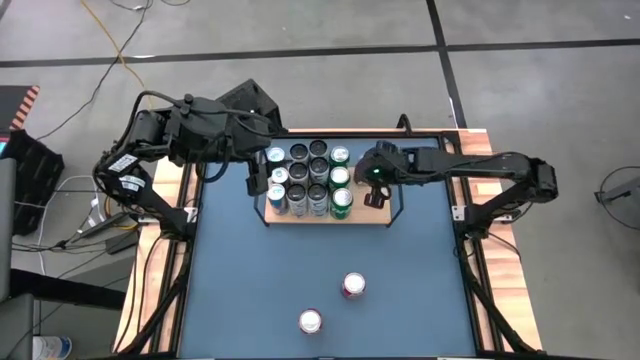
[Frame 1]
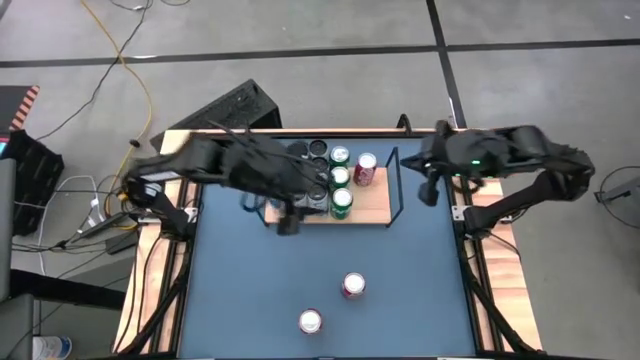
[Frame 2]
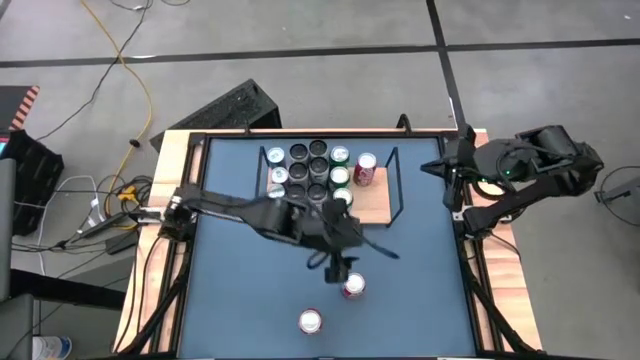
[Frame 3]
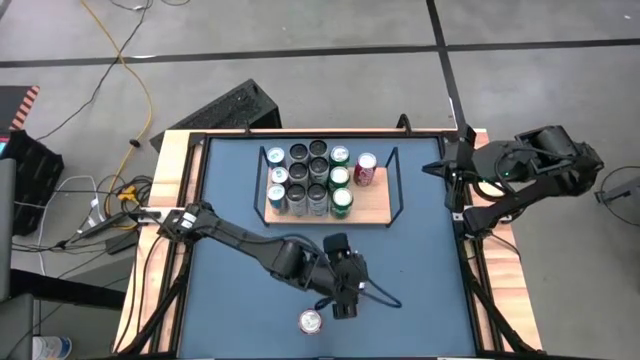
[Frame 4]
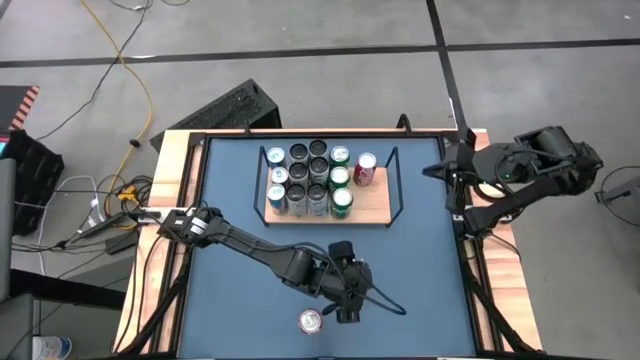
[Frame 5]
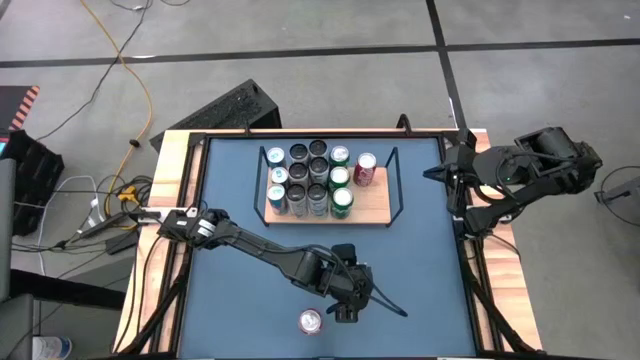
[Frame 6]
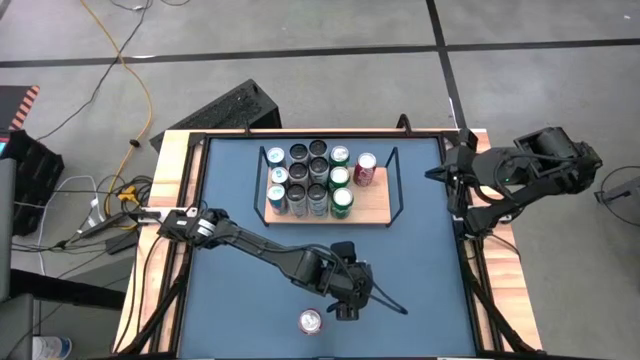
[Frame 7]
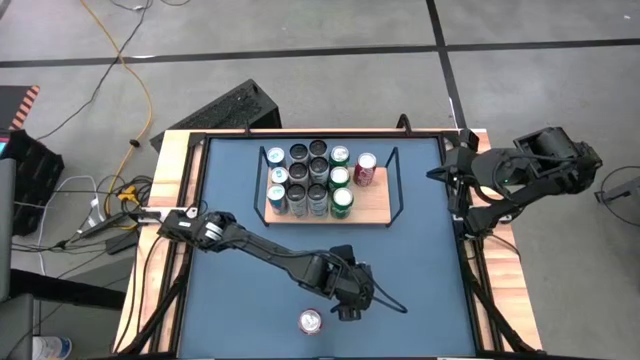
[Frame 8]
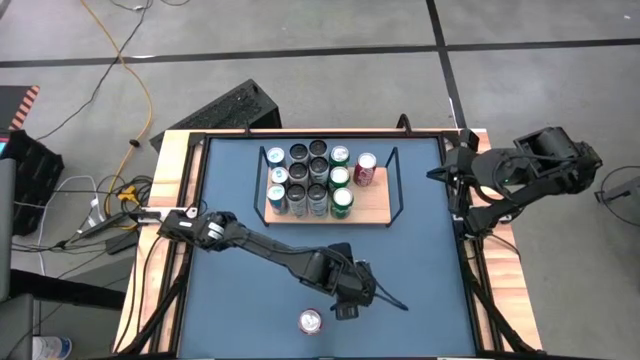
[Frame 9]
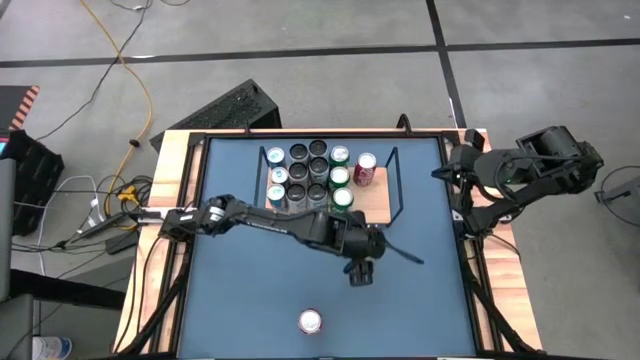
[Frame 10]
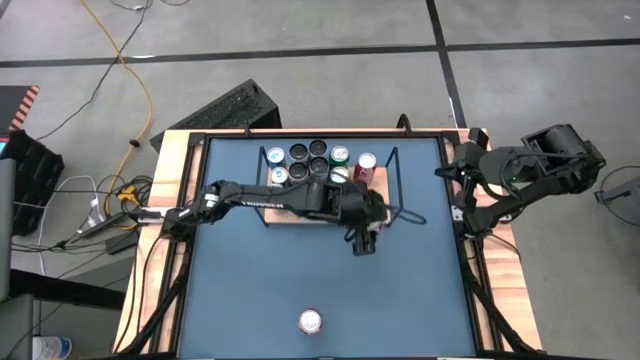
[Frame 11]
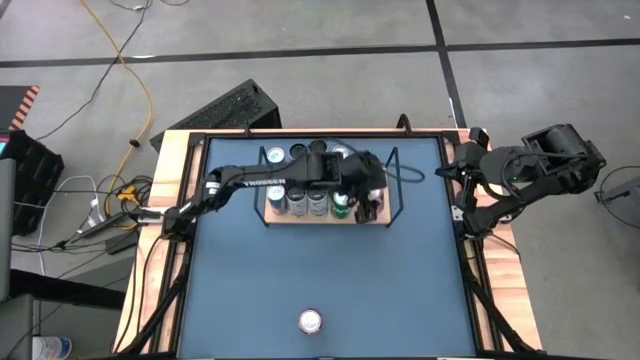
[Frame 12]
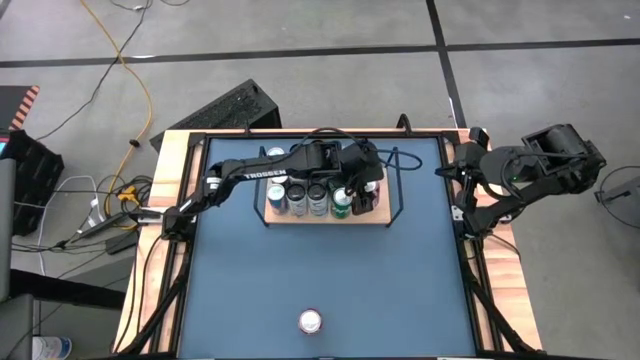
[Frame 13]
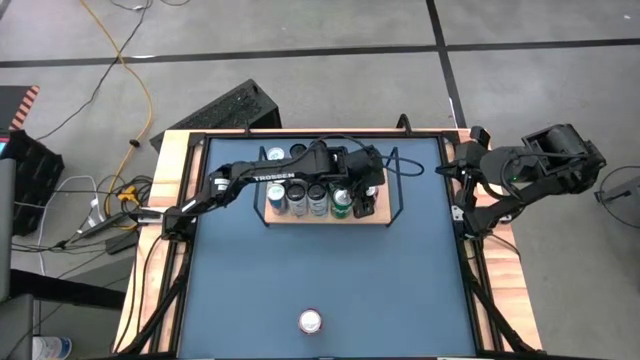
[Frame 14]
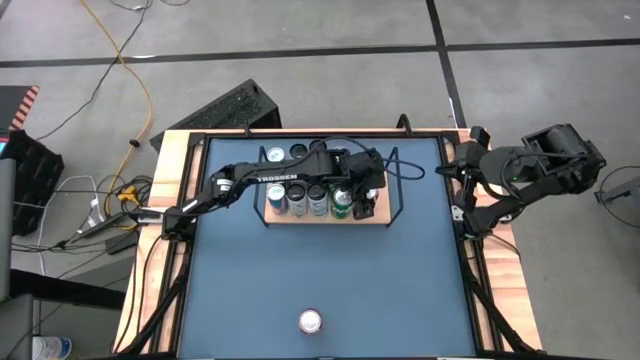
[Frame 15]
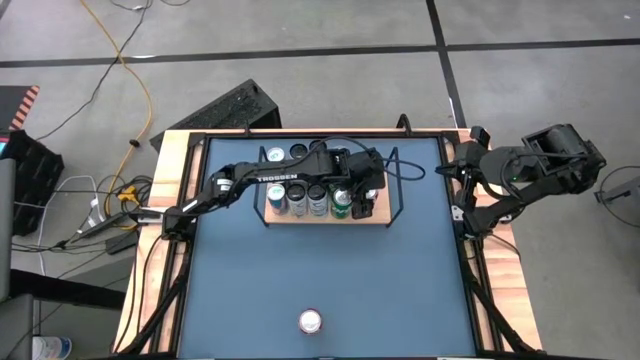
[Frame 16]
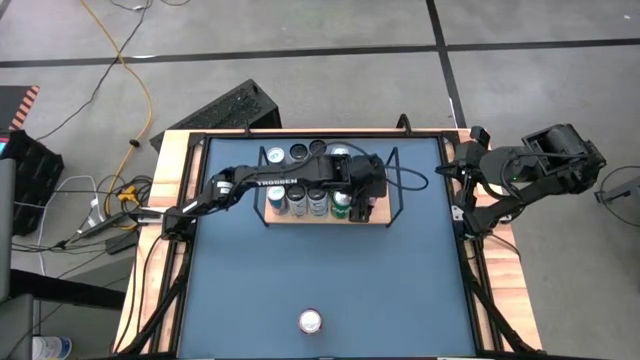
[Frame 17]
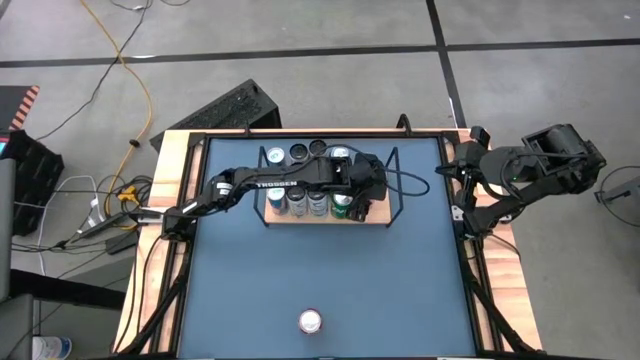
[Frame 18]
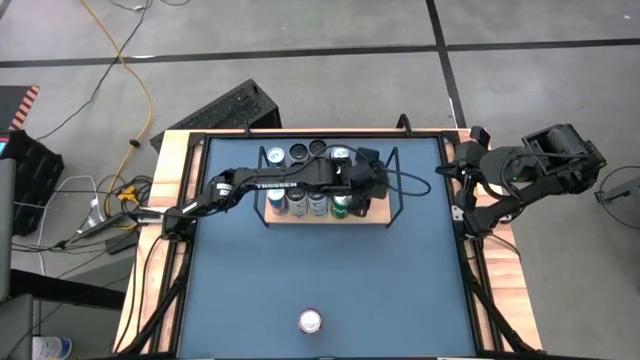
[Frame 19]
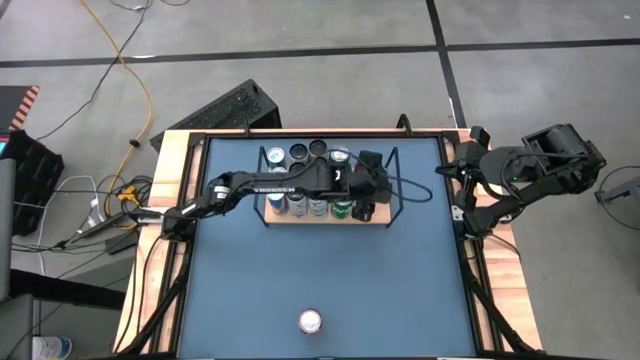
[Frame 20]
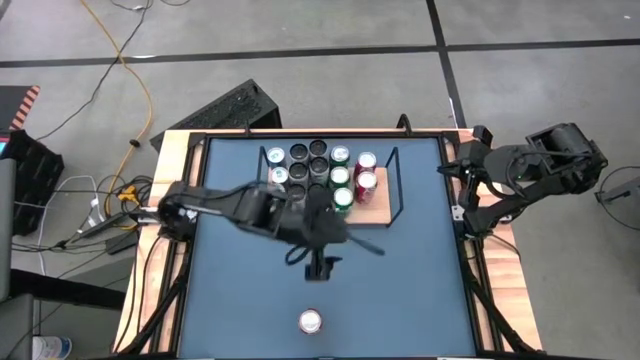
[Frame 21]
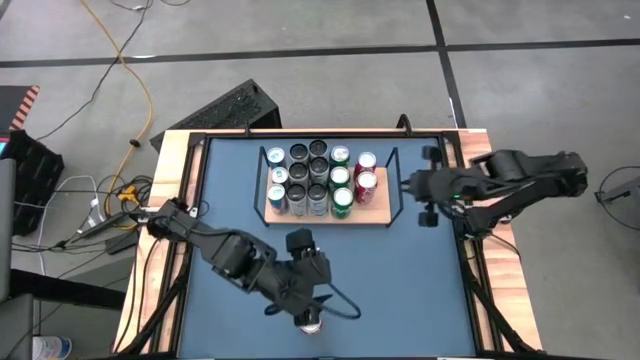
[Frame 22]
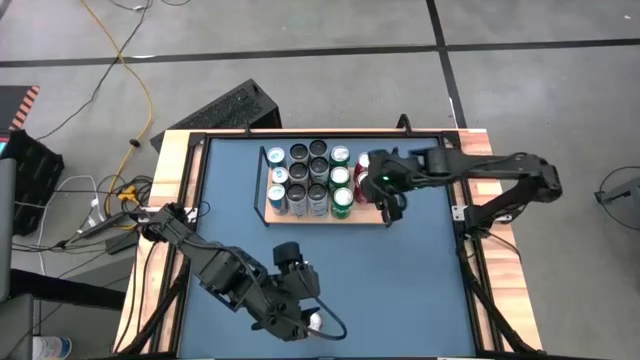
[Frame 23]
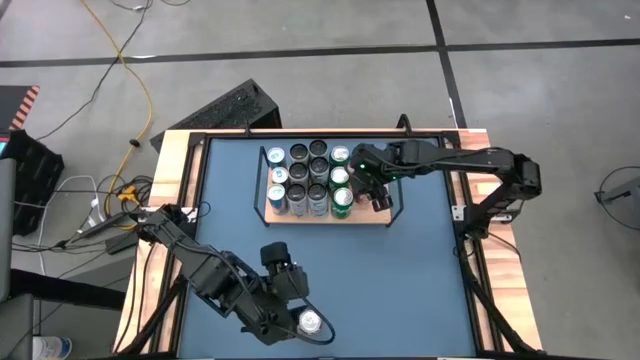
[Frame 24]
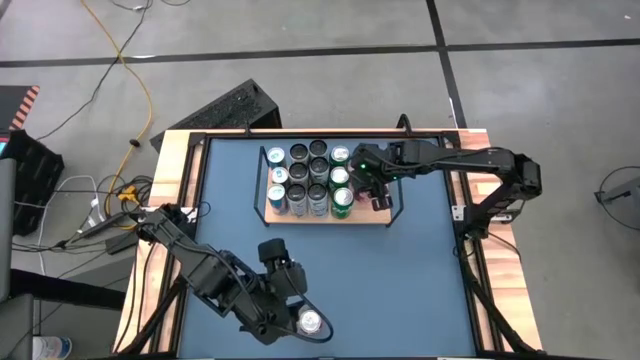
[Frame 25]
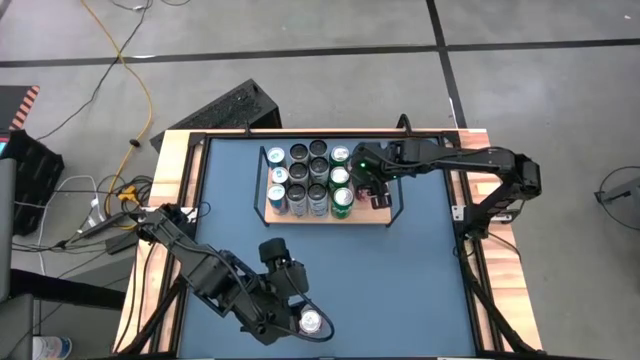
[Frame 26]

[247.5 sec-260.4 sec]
Task: Place canned beverage on shelf
Put the right red soda can on the shelf aligned with the other red soda can

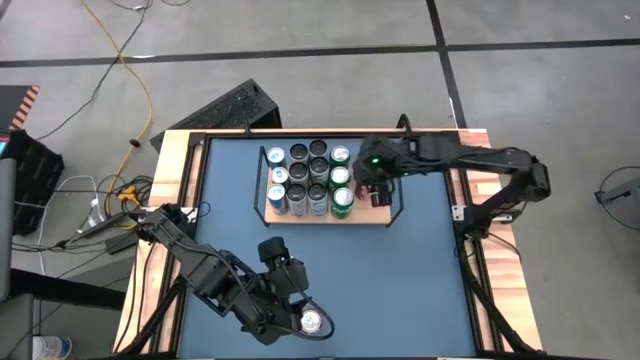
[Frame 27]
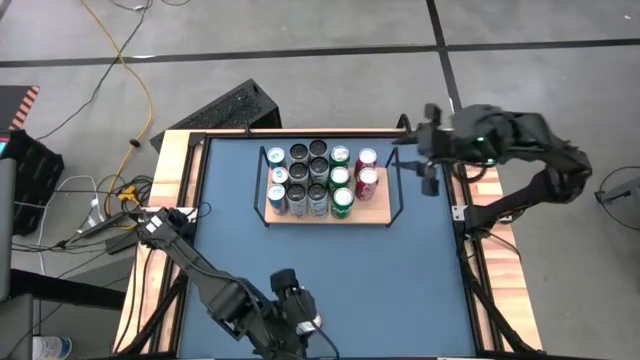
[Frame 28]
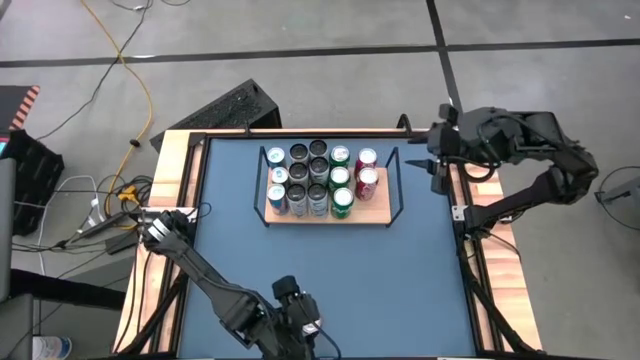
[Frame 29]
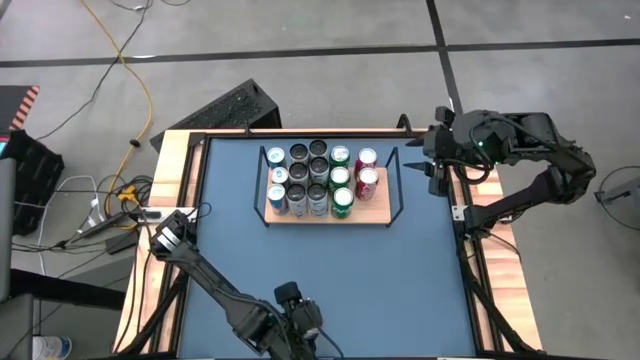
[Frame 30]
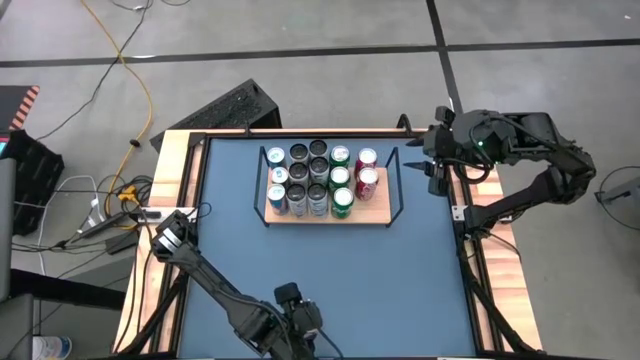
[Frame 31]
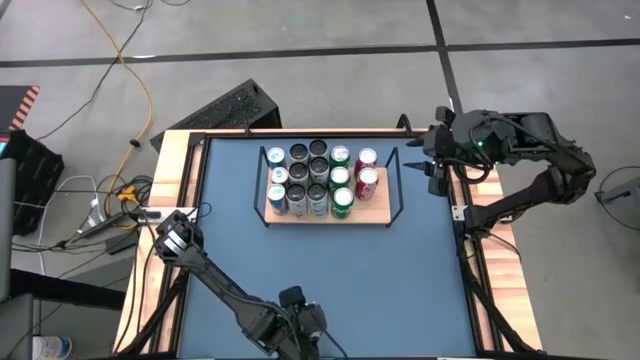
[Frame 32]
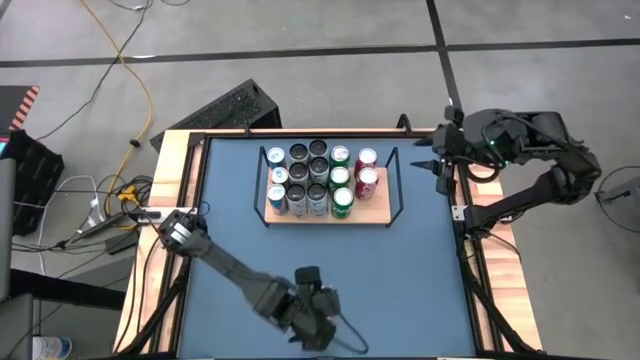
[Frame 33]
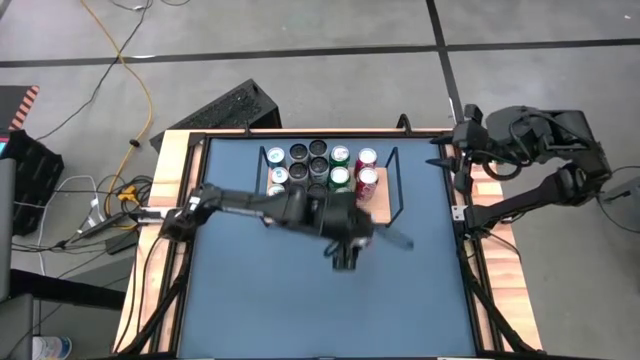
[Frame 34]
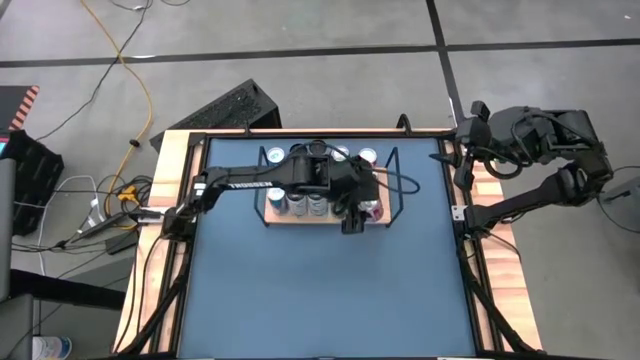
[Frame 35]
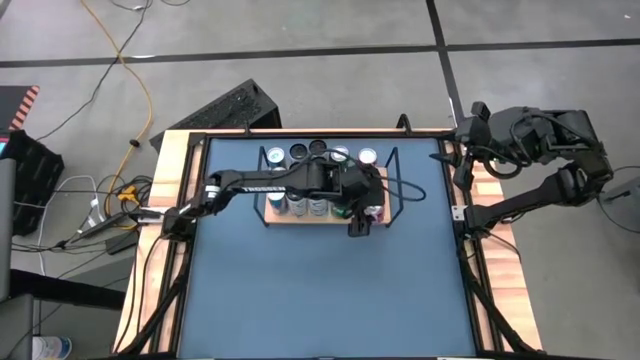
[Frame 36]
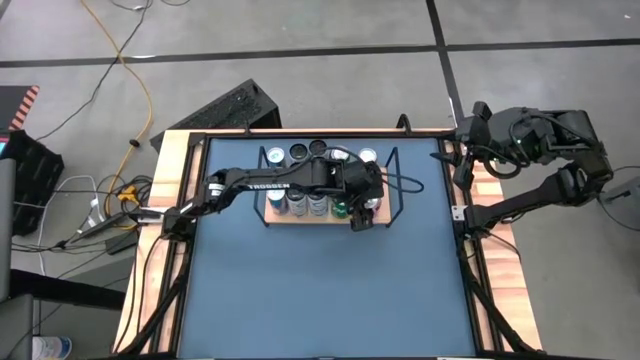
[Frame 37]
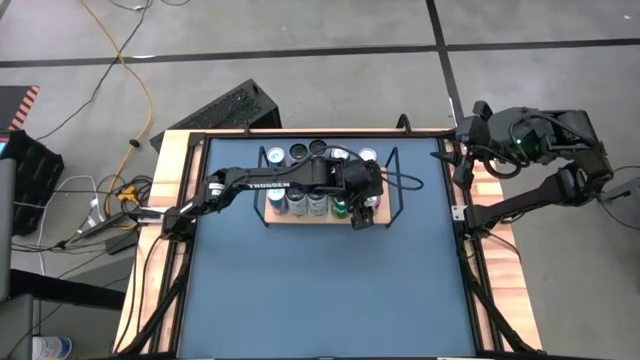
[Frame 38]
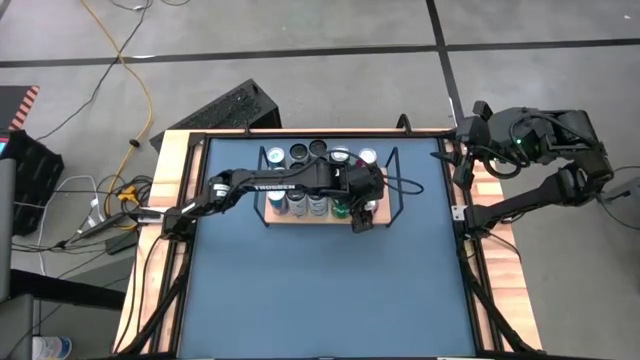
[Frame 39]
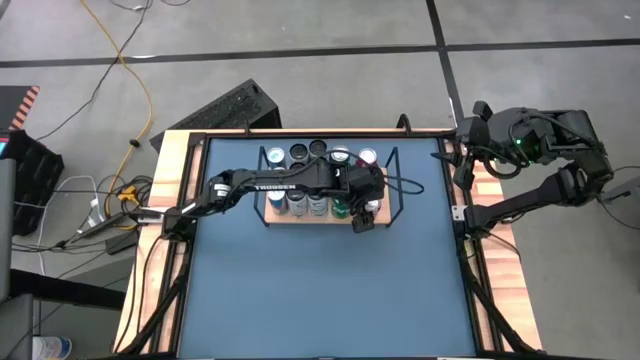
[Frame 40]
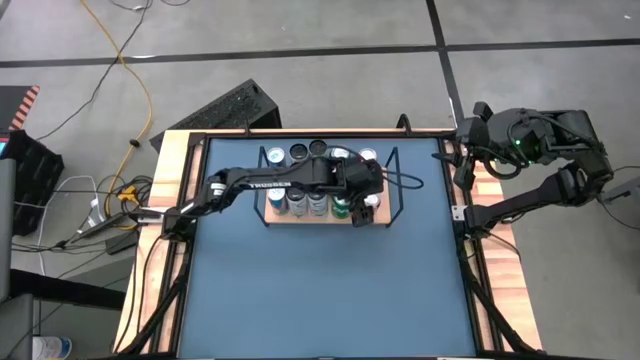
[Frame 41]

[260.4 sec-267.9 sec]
Put the red soda can on the shelf aligned with the other red soda cans
